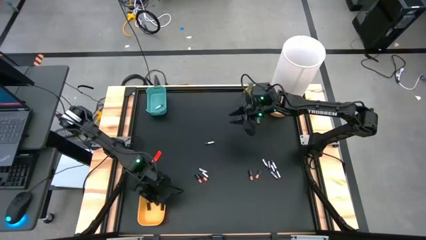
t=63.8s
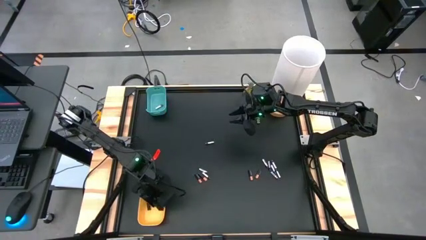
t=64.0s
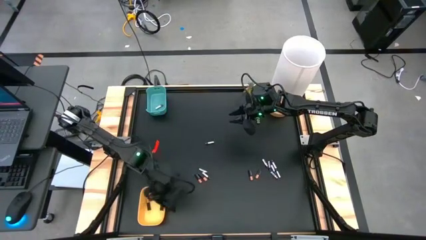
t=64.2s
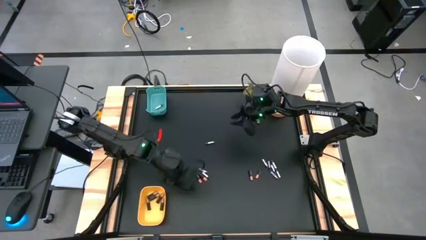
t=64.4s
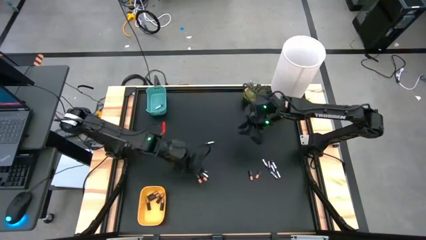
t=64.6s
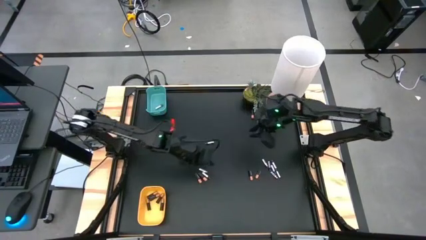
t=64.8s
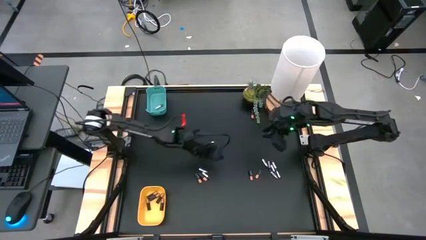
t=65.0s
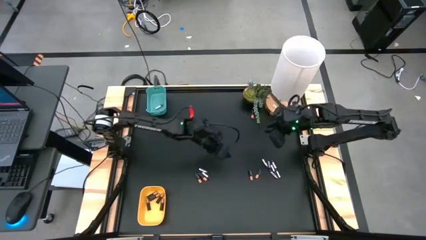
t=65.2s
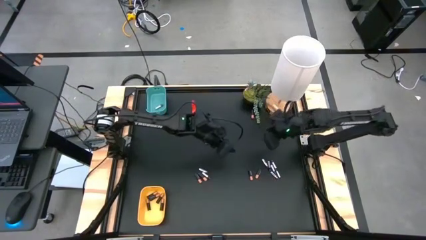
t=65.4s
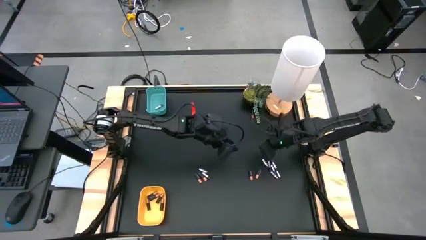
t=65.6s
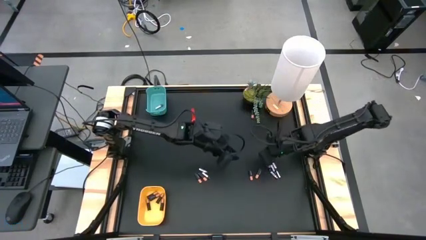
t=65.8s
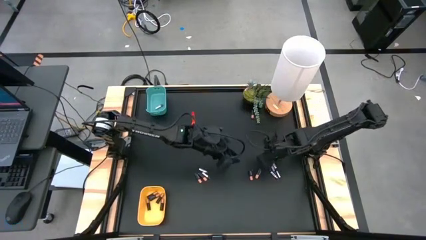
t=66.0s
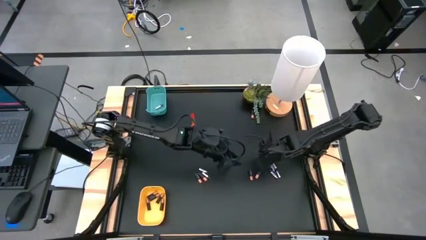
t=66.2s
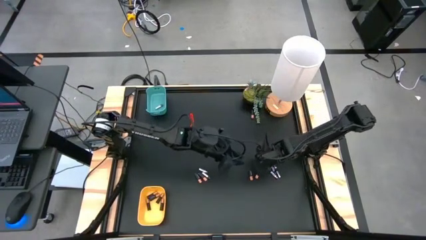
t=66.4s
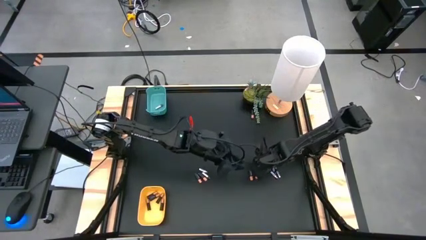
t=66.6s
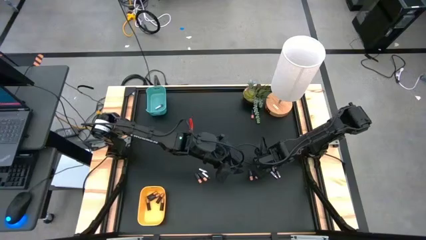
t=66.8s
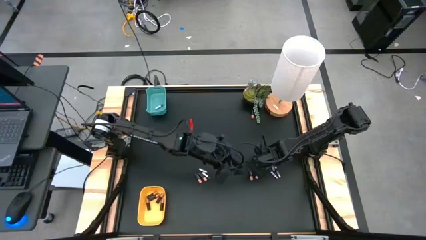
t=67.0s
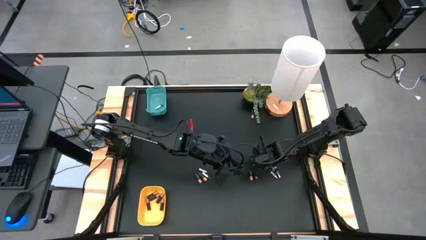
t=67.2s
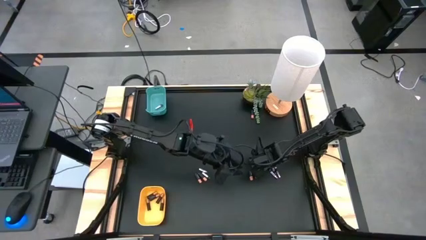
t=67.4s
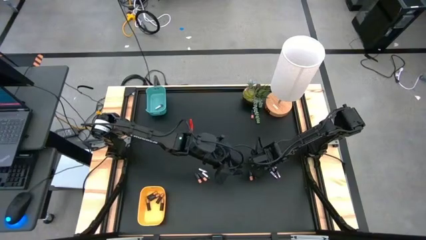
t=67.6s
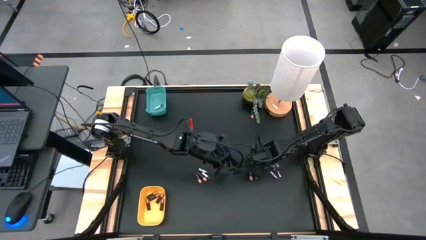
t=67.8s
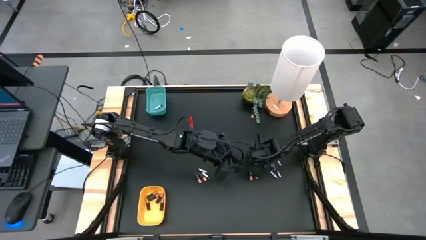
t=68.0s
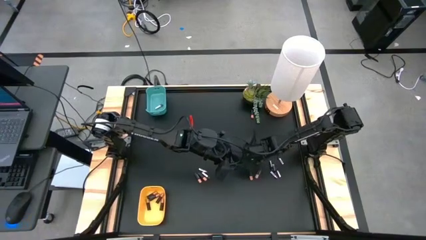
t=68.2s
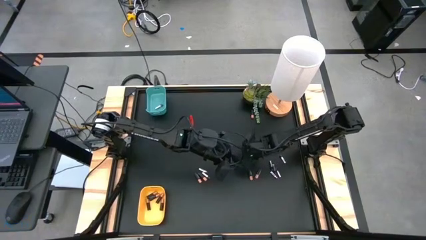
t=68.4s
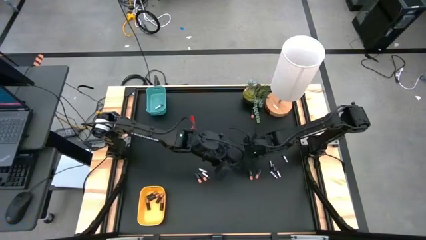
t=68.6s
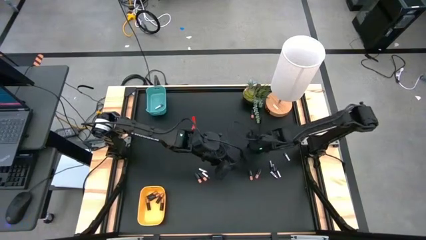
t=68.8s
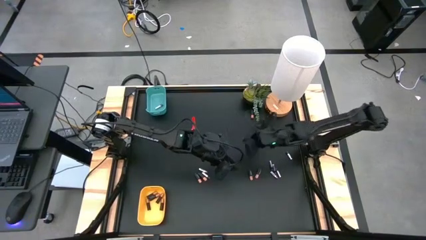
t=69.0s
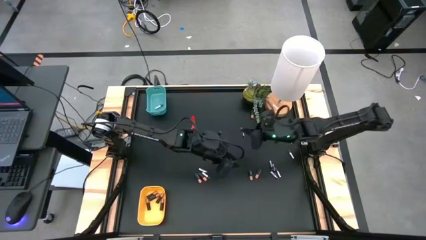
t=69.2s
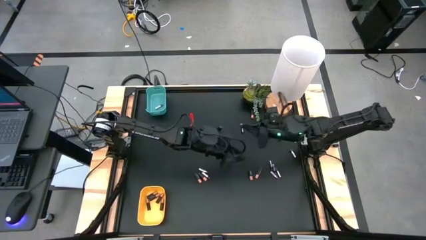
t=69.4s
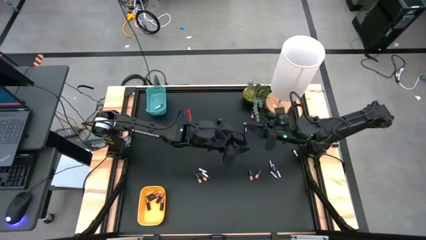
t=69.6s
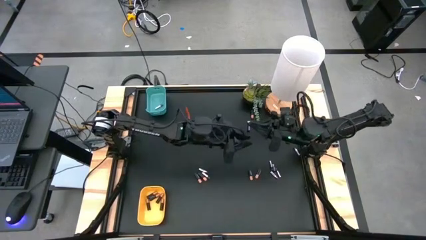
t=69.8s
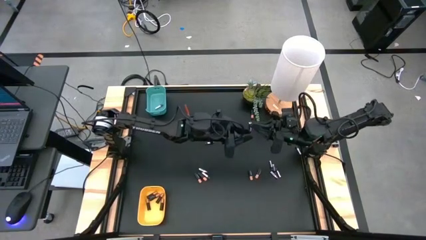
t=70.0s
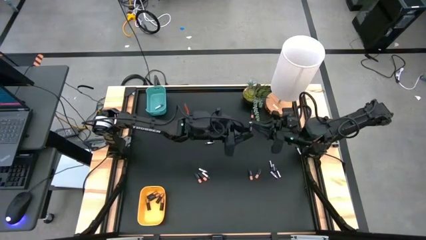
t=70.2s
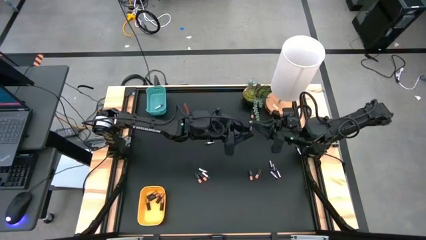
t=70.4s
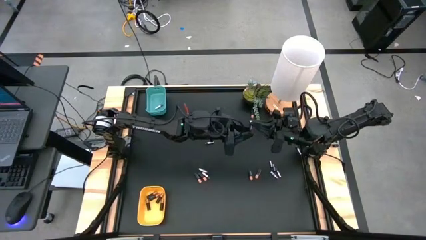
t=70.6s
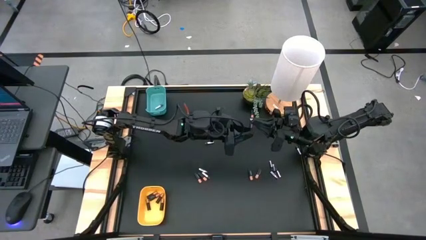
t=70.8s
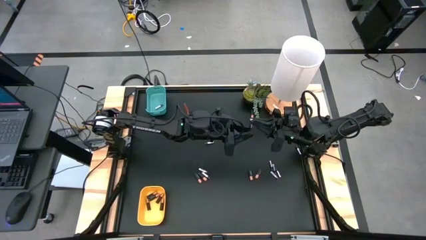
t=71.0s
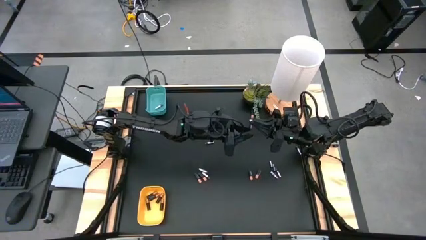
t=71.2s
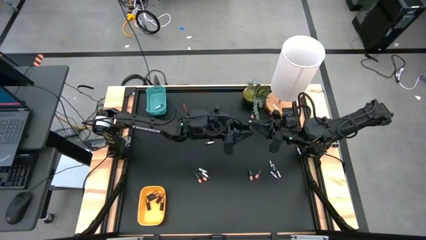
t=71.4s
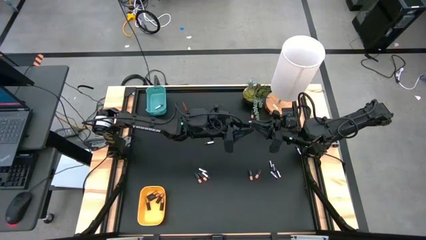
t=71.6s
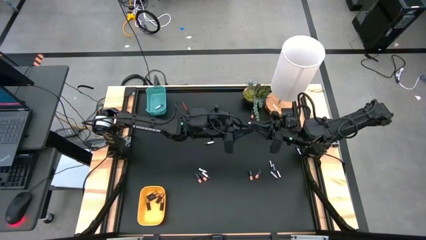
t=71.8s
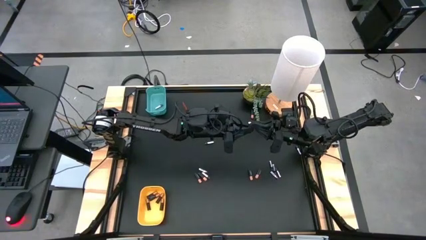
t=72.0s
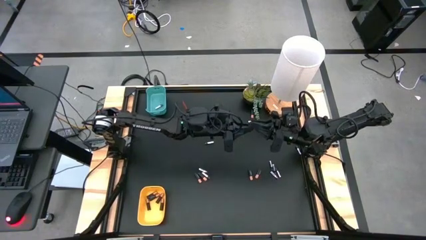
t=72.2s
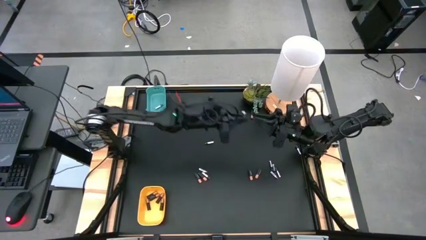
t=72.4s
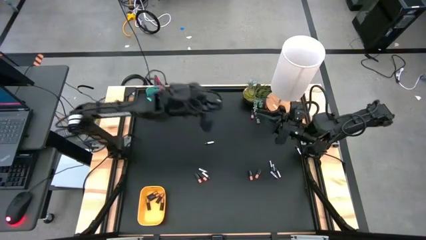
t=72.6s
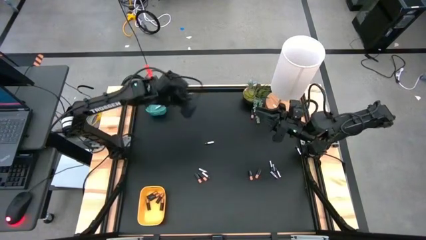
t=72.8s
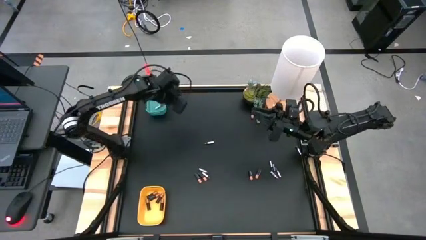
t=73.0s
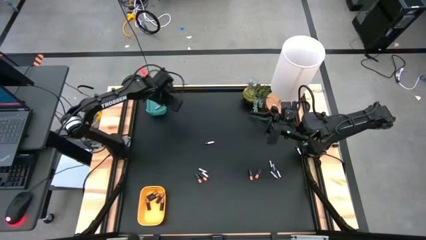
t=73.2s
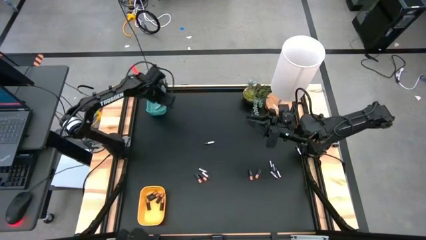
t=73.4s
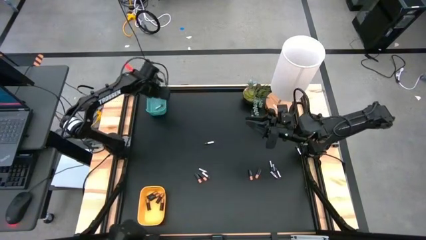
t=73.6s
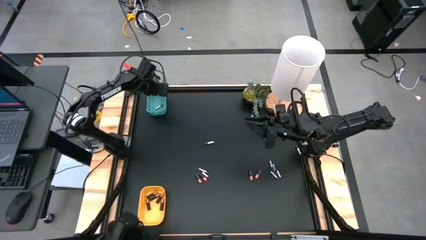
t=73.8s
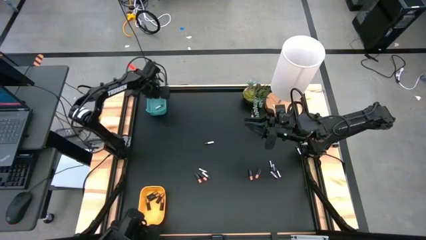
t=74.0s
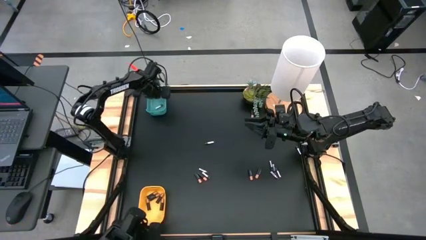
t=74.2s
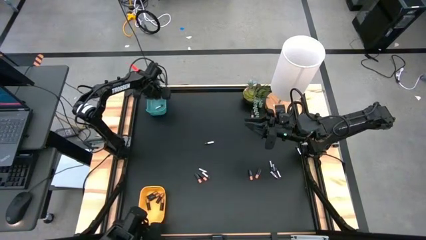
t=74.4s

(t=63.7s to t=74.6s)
Task: Sort batteries
Put the silver battery into the blue bin
